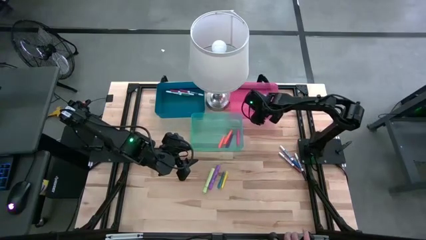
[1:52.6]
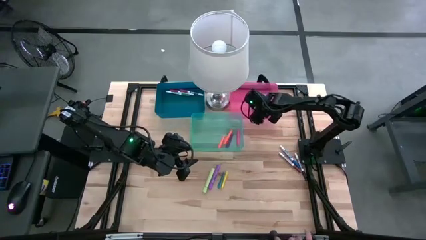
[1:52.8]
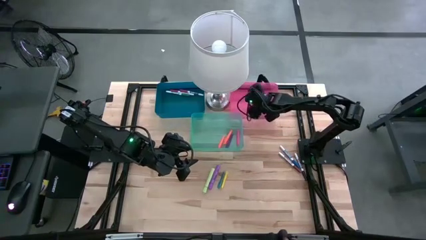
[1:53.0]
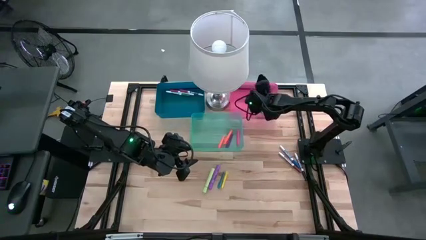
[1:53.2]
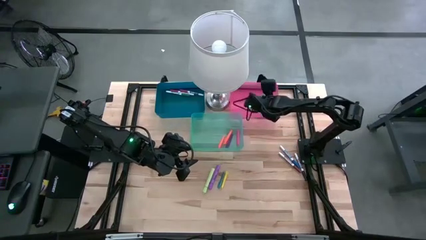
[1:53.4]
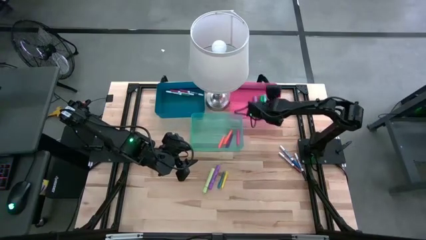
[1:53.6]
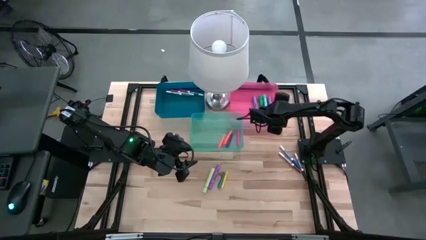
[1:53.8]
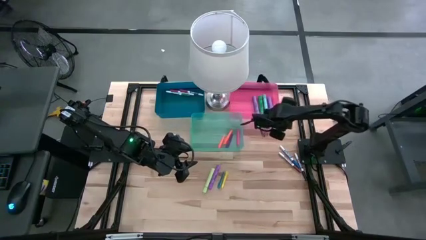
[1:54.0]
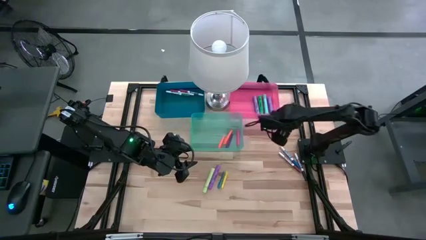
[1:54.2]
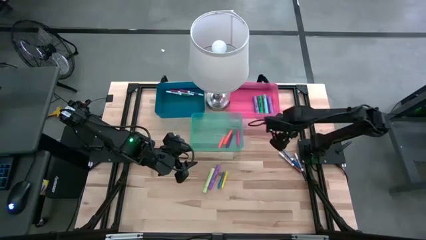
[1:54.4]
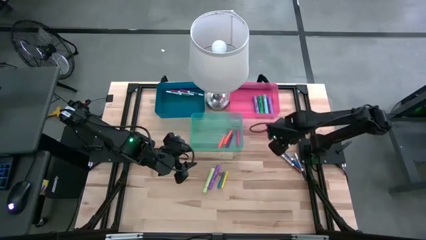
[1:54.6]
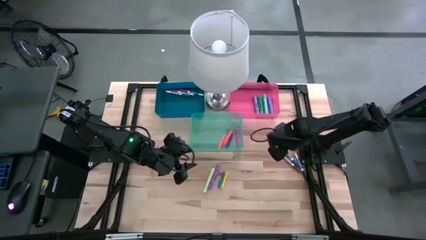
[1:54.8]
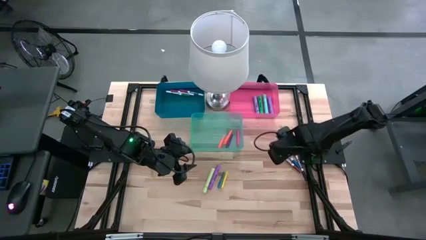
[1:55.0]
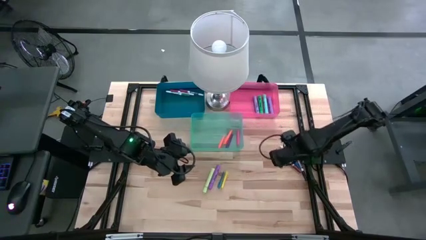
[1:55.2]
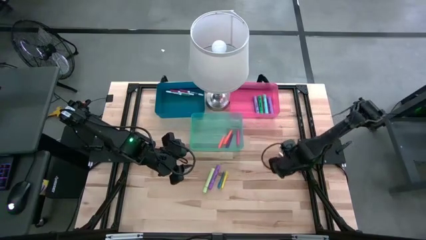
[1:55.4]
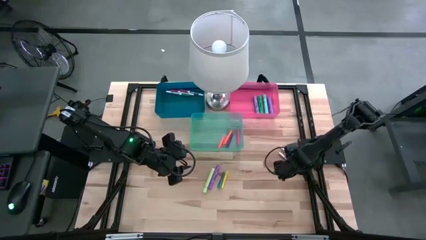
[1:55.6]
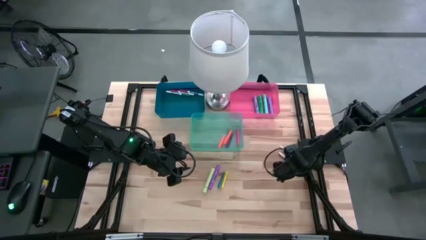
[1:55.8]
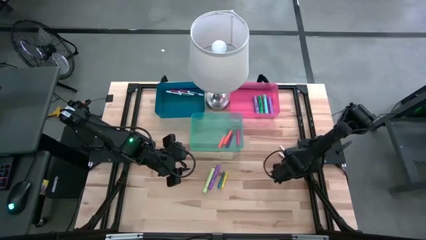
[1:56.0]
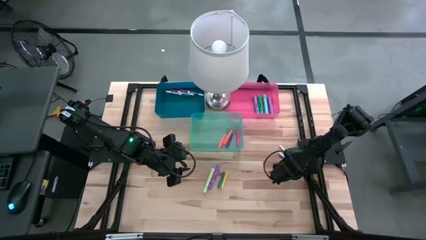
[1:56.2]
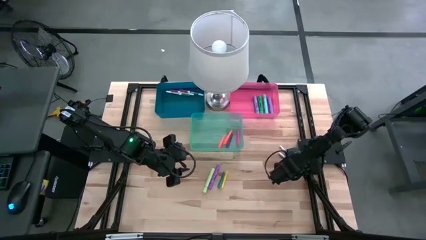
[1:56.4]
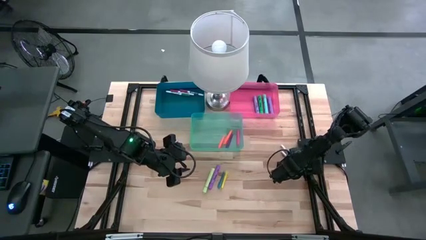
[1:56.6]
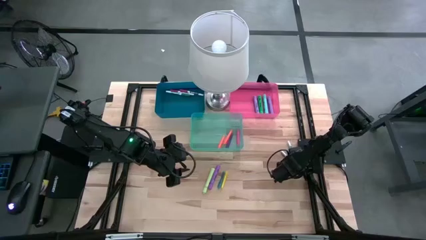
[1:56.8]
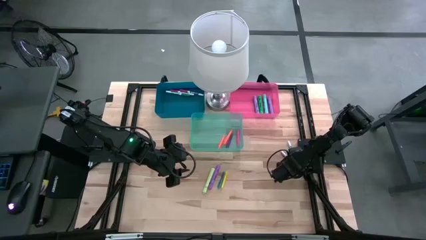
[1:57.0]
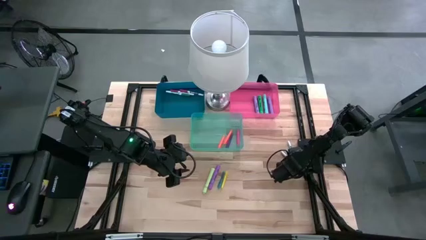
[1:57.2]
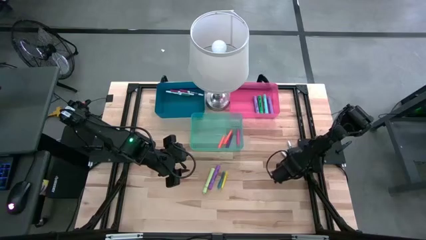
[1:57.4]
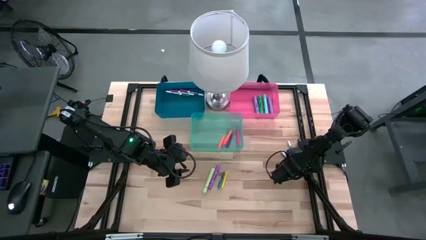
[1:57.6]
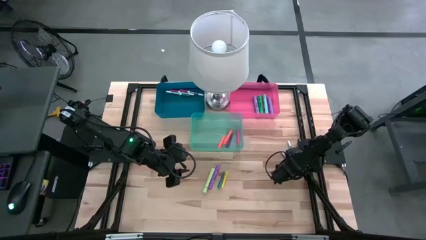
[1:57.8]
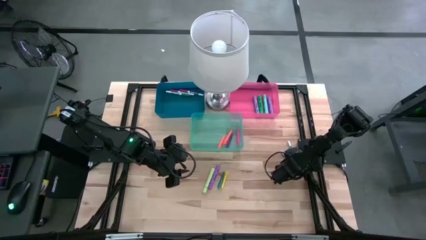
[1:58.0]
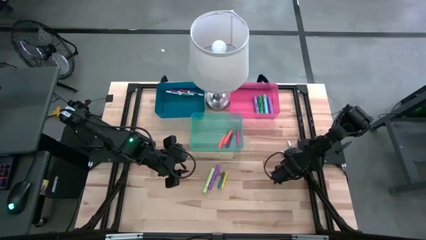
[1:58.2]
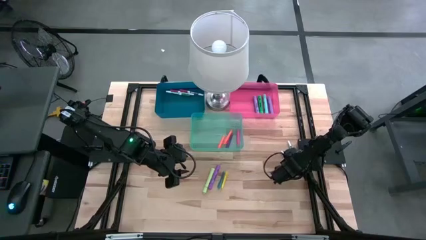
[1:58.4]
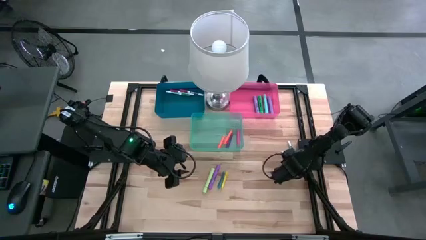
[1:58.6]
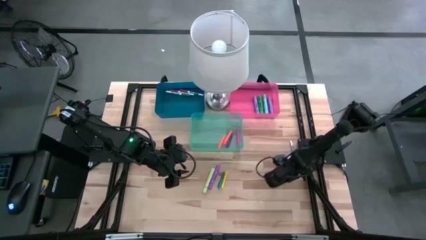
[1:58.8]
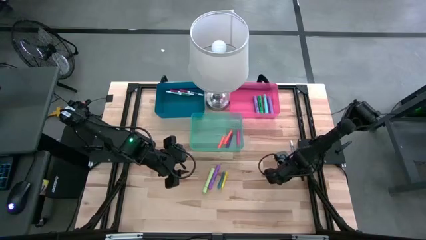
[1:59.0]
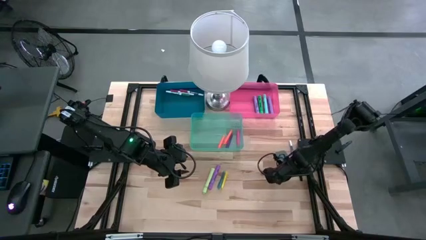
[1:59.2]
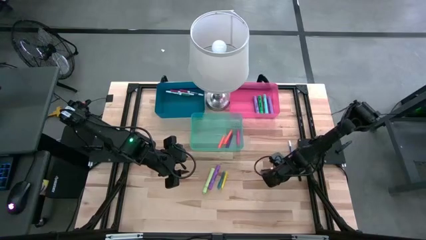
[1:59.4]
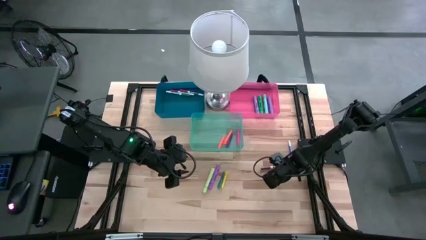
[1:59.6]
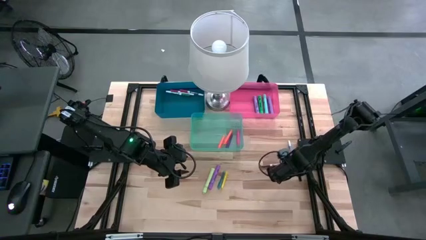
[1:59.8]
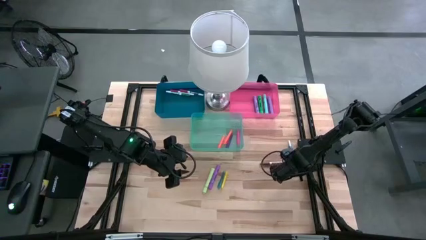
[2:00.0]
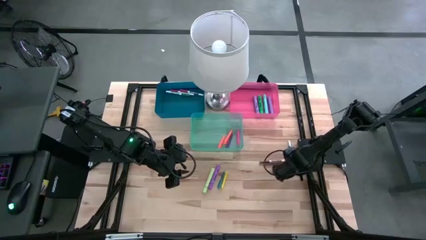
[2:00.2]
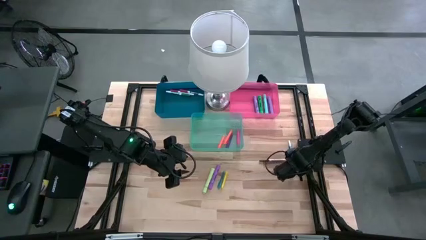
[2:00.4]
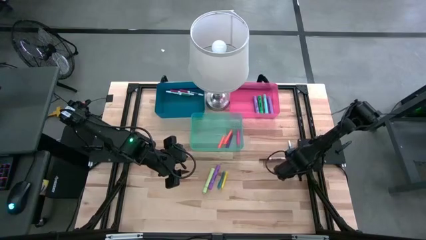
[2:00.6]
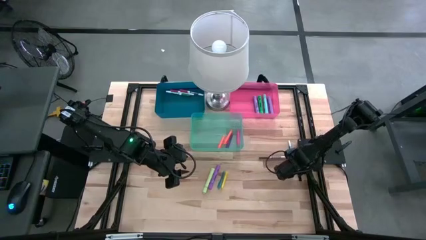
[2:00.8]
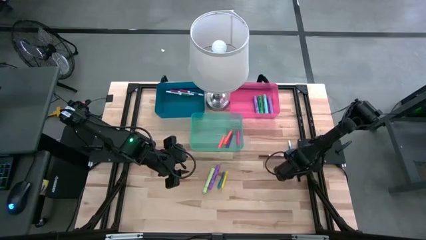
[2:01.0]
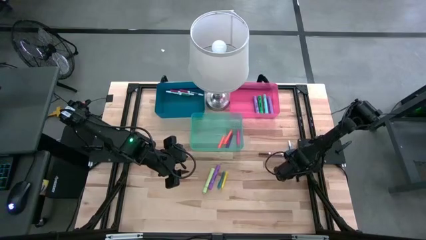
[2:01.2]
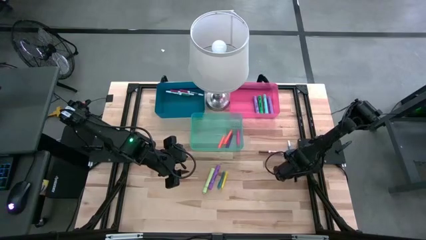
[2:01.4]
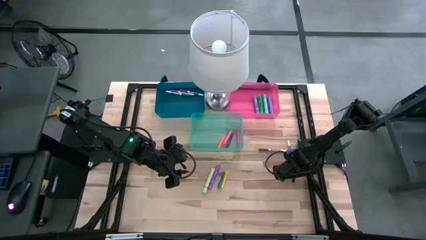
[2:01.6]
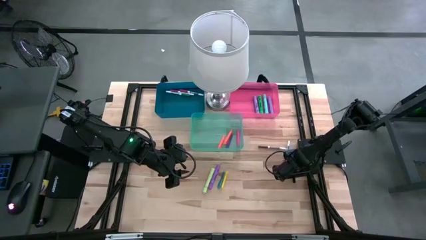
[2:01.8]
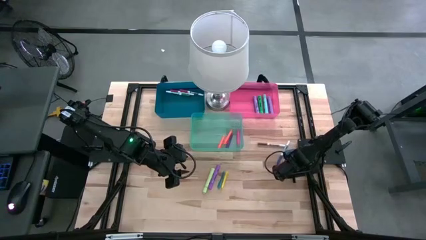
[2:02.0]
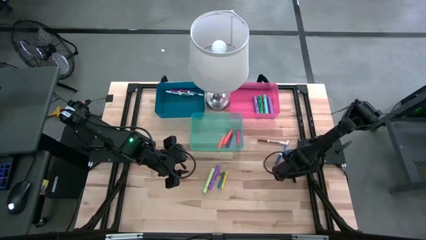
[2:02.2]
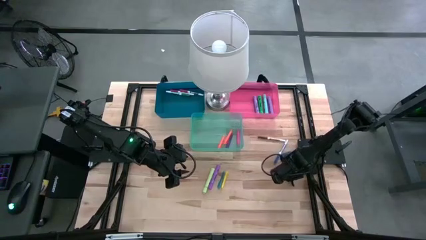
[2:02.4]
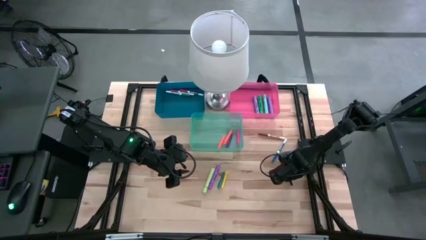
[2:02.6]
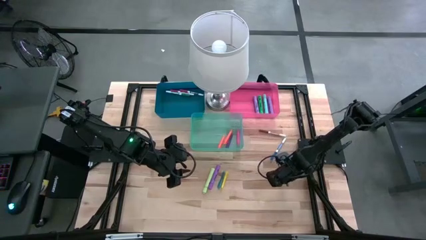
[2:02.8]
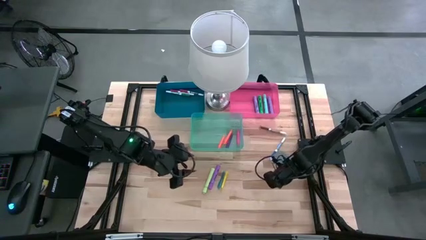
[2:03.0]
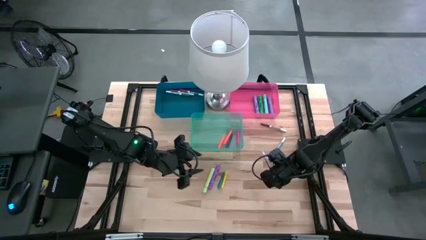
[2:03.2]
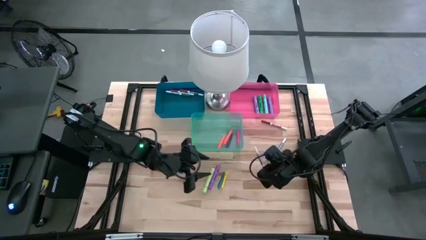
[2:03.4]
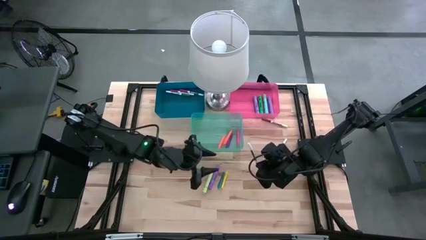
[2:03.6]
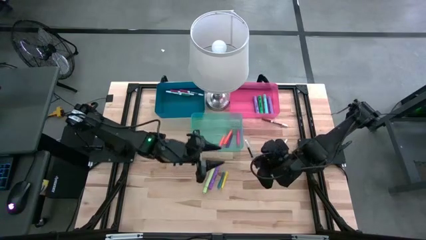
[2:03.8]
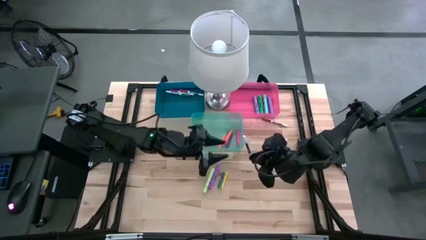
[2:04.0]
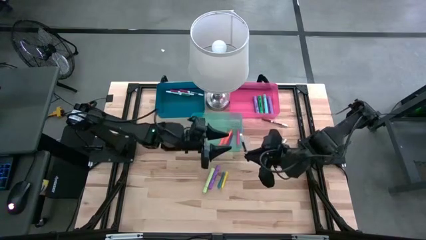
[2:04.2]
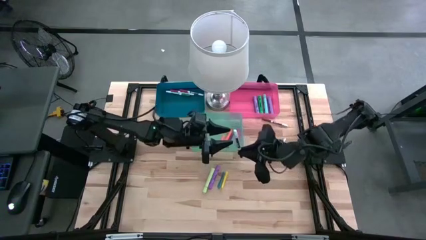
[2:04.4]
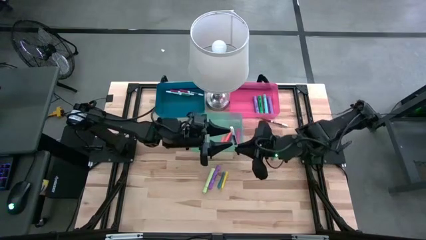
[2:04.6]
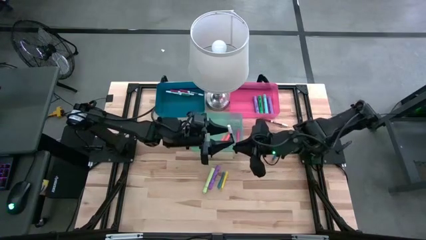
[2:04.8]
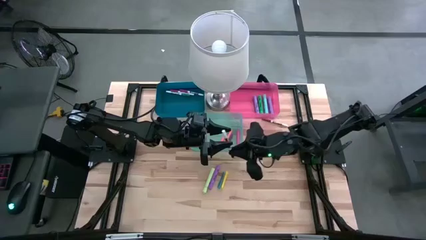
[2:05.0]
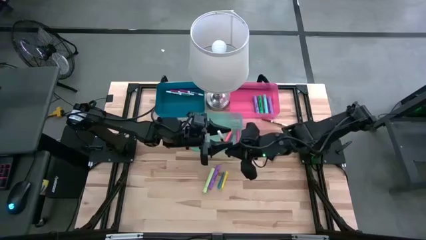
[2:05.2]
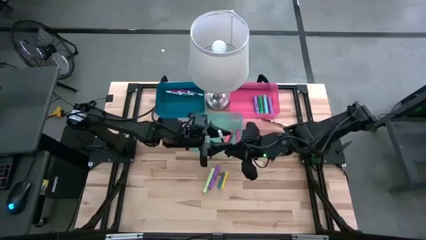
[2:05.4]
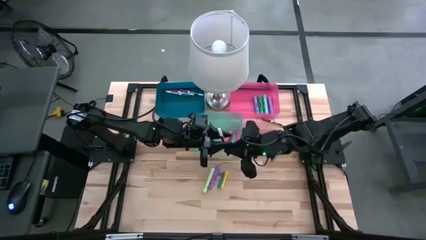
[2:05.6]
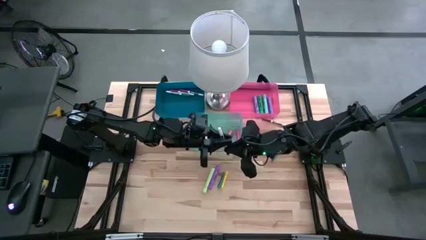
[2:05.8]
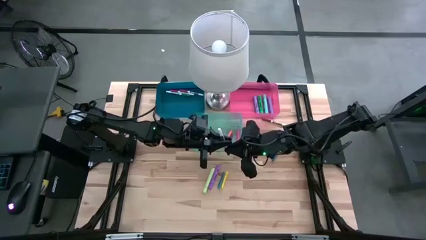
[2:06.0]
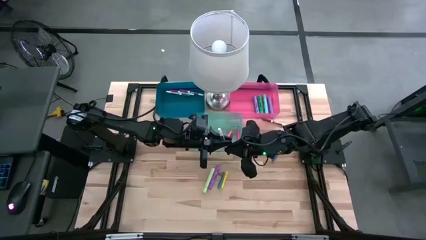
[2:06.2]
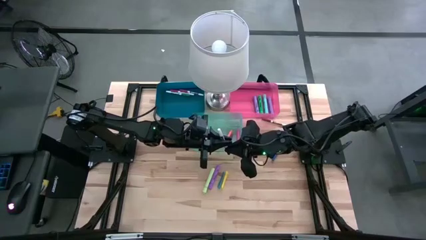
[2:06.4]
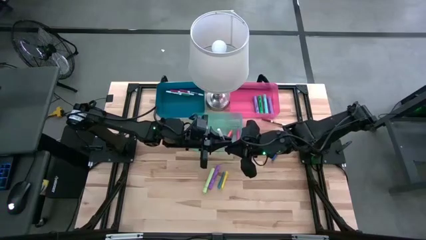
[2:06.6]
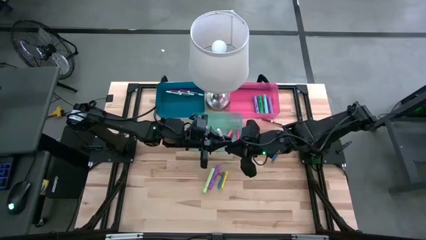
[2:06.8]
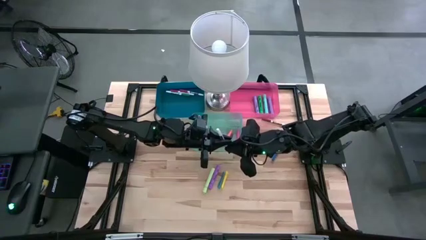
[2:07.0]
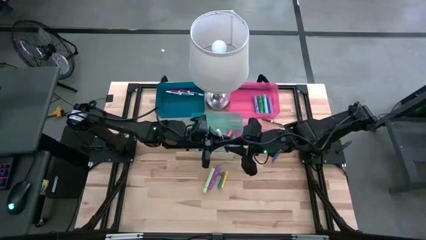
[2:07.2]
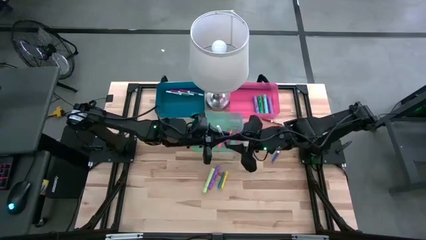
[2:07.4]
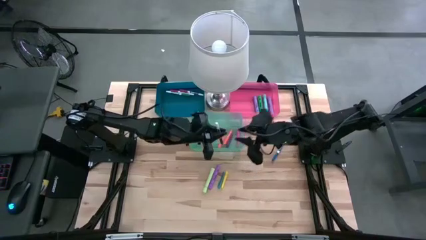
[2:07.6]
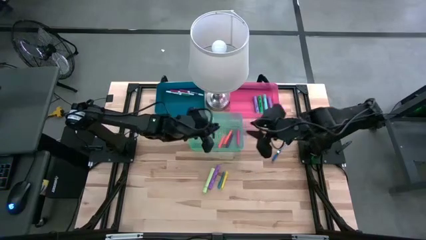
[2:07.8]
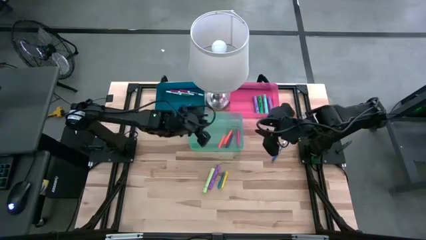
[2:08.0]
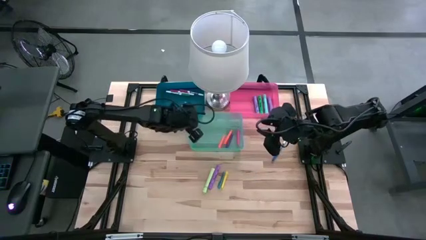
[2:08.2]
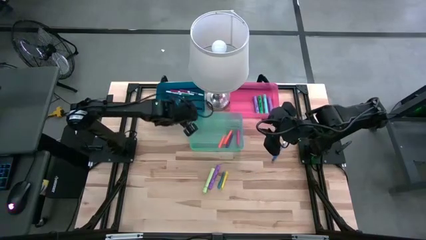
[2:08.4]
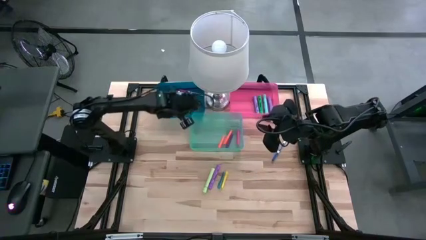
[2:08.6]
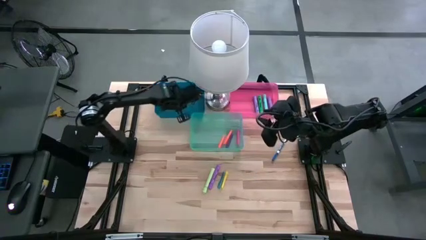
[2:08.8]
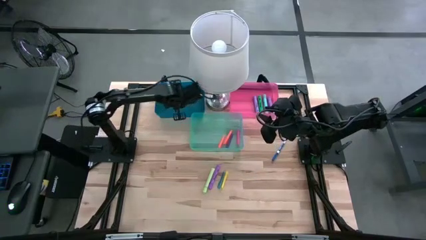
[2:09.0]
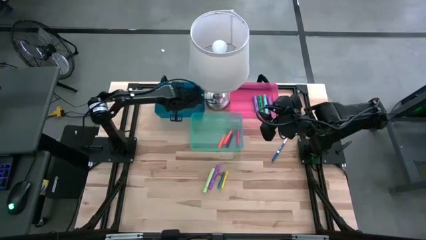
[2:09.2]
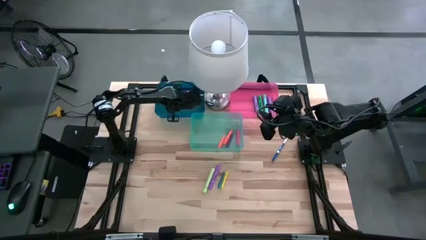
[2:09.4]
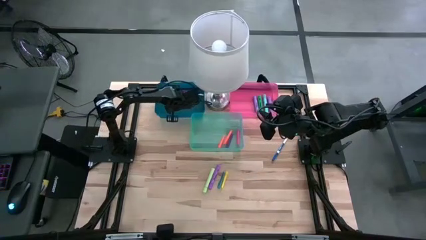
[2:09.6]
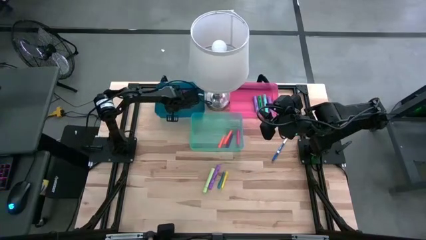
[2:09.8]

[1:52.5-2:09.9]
Task: Pick & Place Markers
Put the black marker pen into the blue bin
